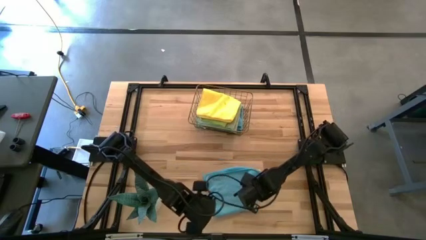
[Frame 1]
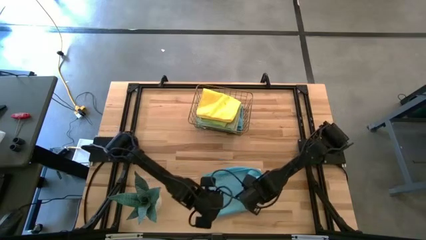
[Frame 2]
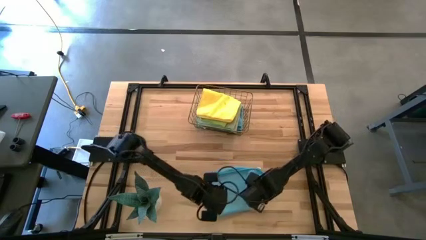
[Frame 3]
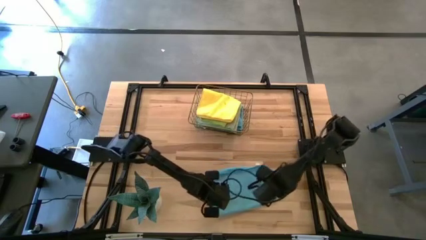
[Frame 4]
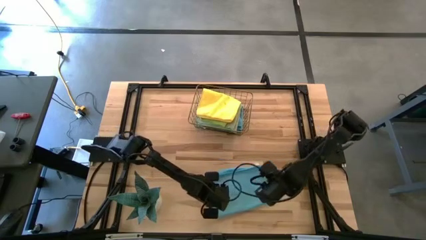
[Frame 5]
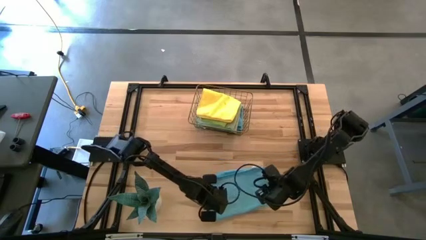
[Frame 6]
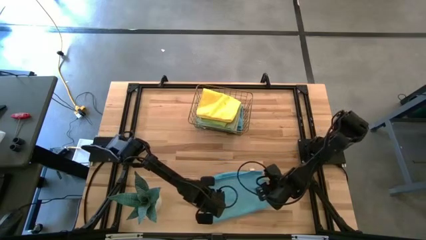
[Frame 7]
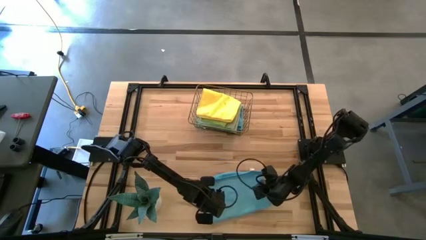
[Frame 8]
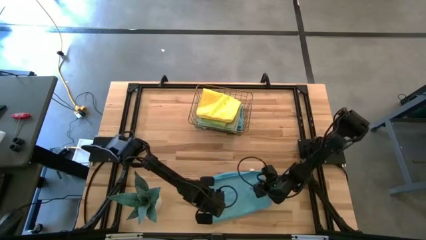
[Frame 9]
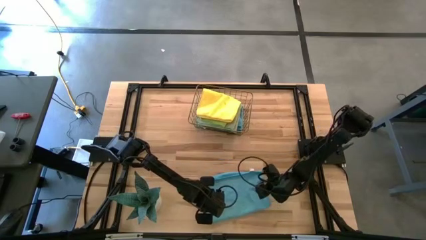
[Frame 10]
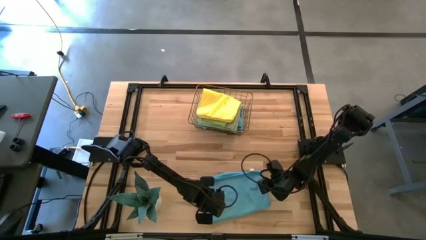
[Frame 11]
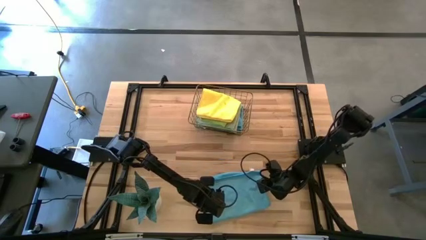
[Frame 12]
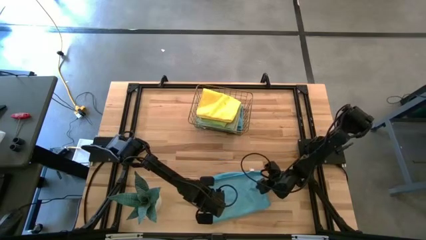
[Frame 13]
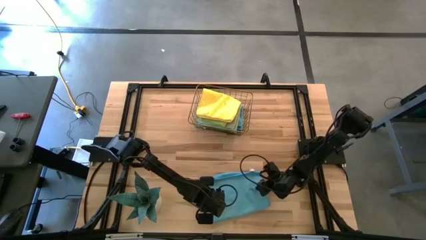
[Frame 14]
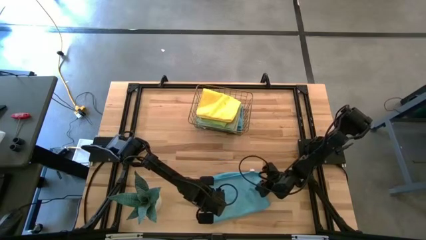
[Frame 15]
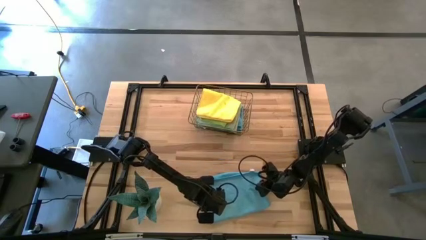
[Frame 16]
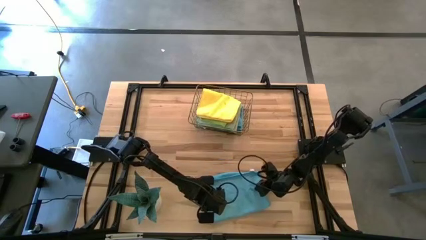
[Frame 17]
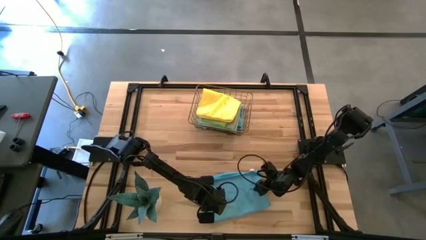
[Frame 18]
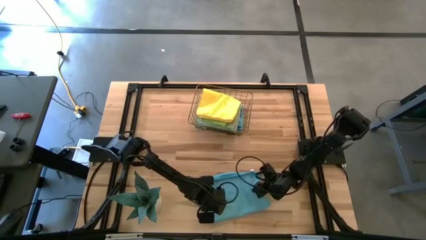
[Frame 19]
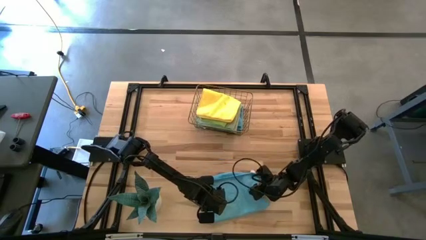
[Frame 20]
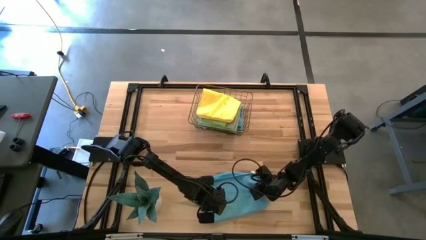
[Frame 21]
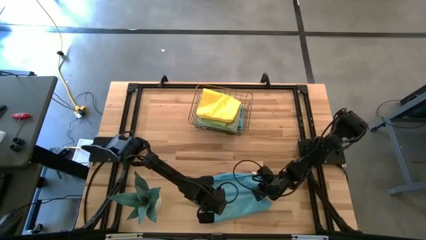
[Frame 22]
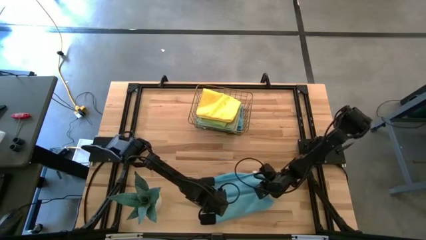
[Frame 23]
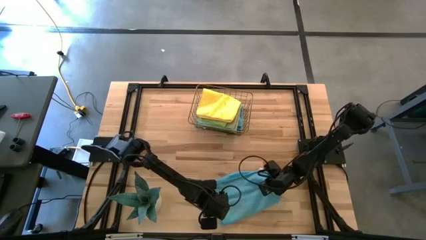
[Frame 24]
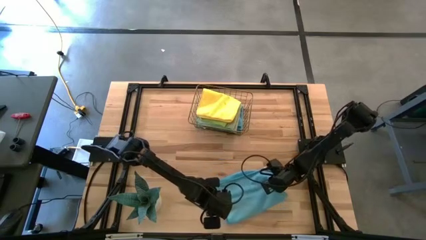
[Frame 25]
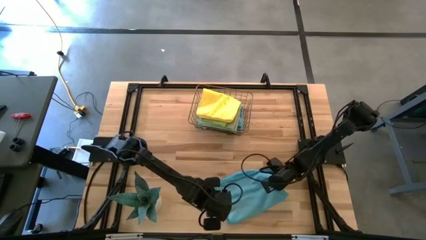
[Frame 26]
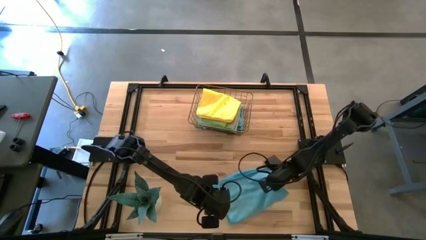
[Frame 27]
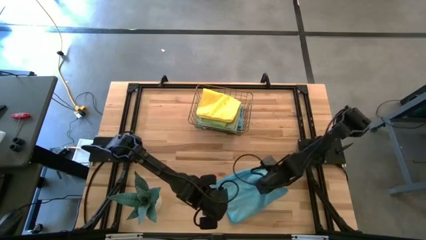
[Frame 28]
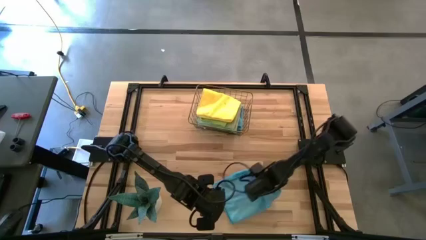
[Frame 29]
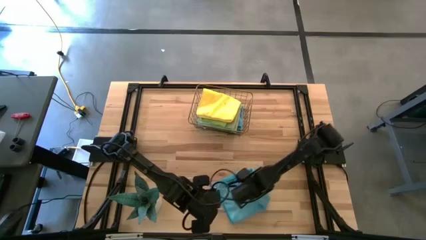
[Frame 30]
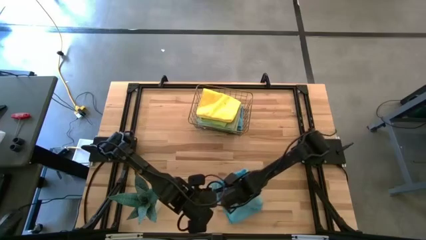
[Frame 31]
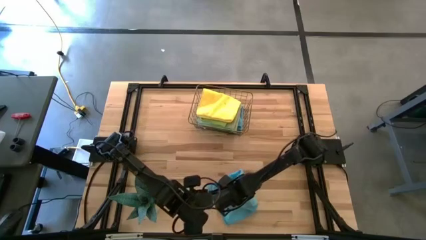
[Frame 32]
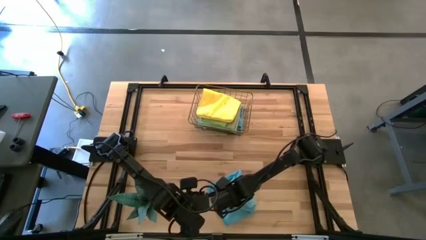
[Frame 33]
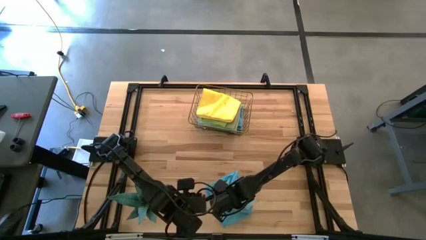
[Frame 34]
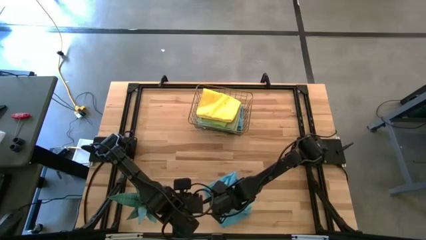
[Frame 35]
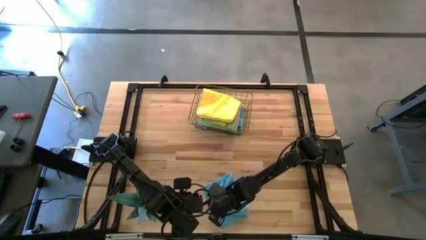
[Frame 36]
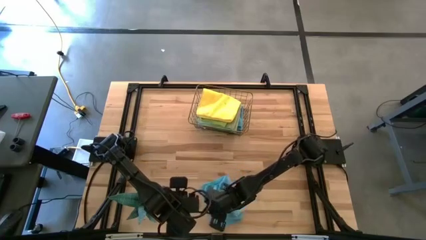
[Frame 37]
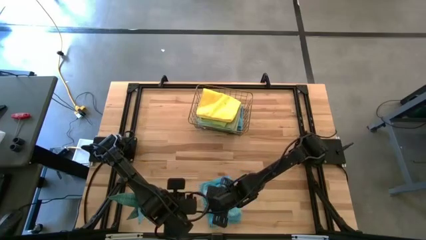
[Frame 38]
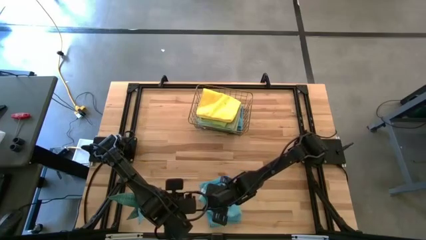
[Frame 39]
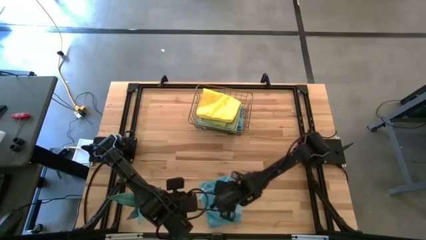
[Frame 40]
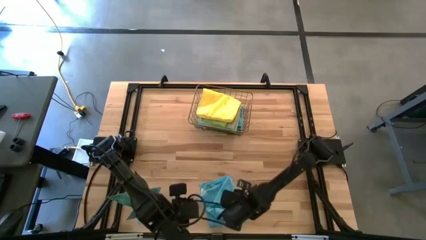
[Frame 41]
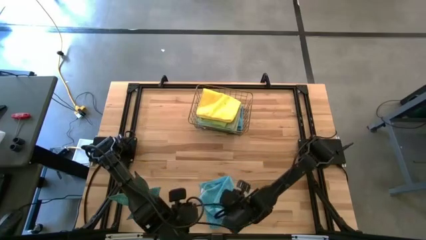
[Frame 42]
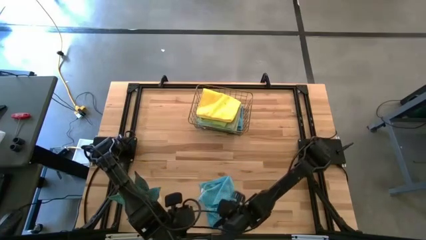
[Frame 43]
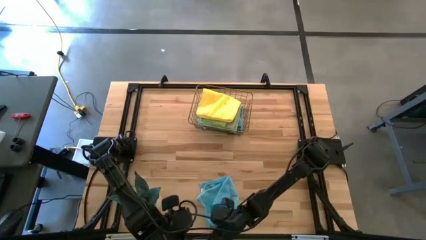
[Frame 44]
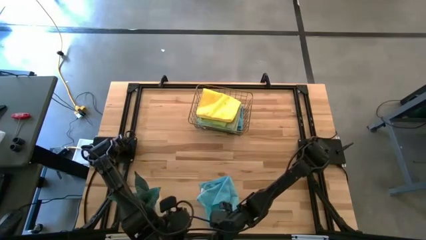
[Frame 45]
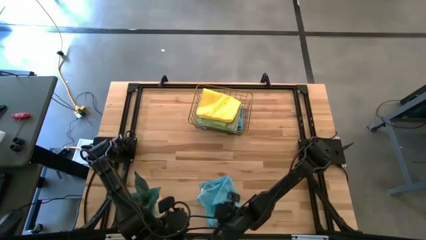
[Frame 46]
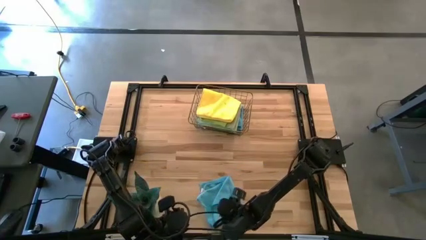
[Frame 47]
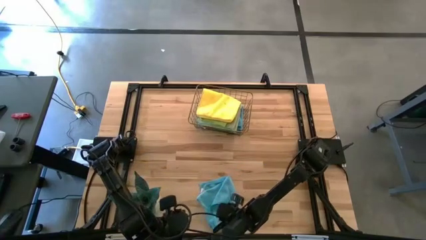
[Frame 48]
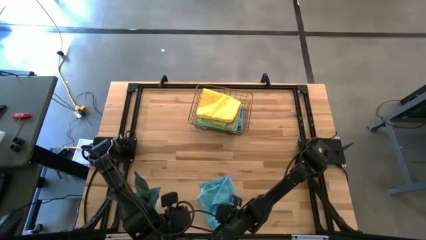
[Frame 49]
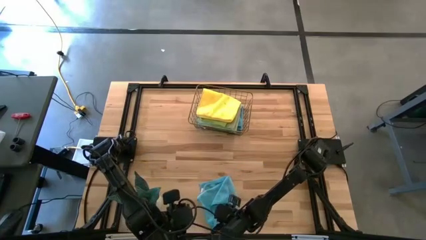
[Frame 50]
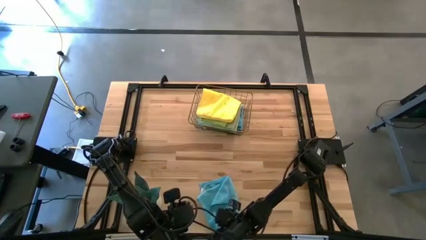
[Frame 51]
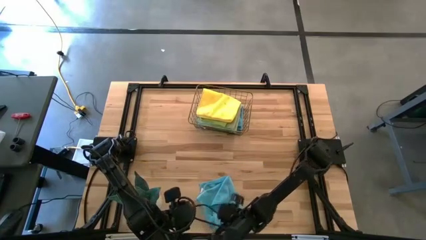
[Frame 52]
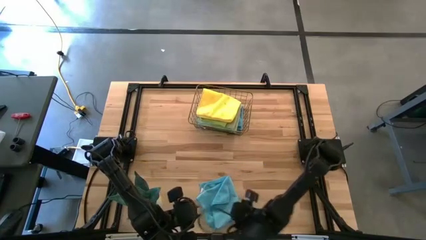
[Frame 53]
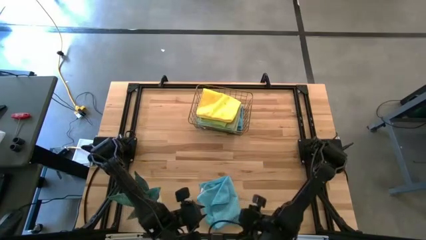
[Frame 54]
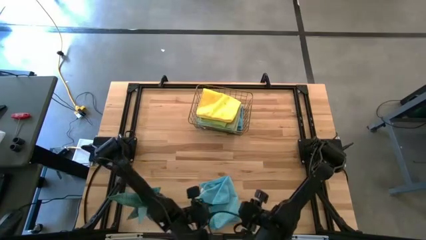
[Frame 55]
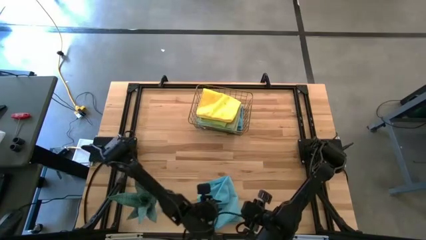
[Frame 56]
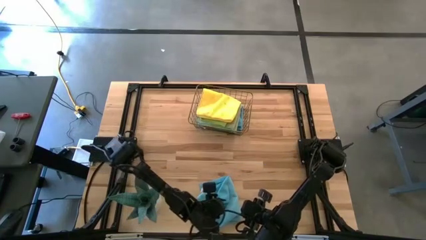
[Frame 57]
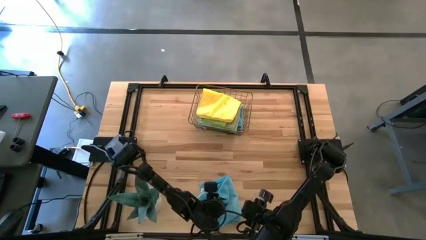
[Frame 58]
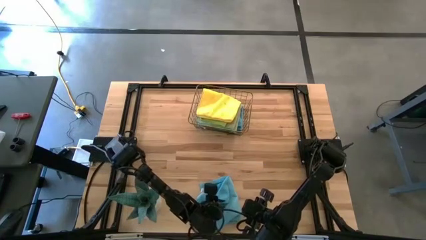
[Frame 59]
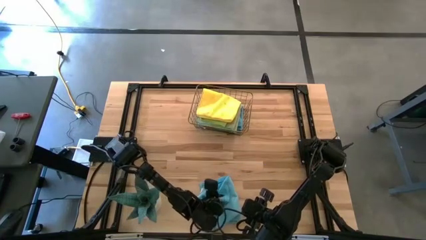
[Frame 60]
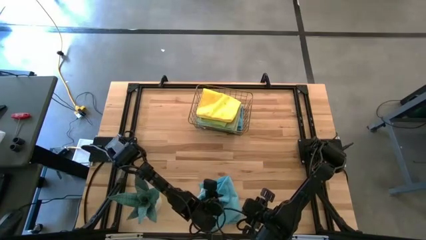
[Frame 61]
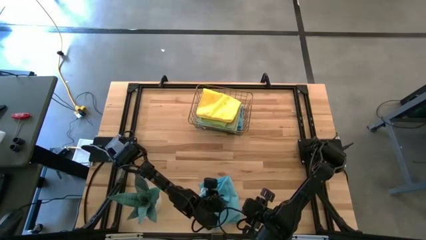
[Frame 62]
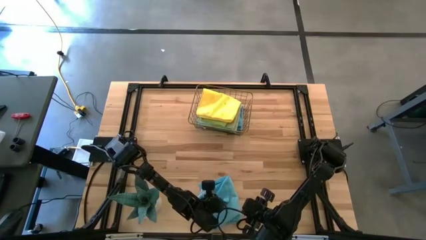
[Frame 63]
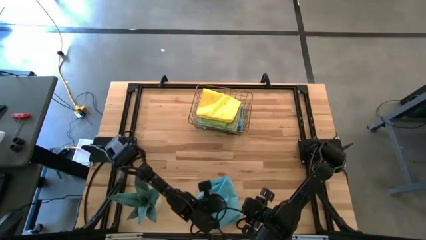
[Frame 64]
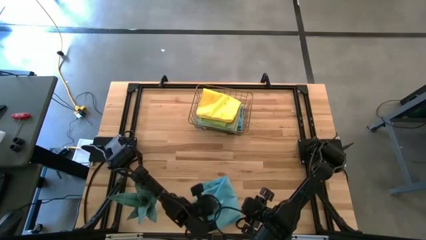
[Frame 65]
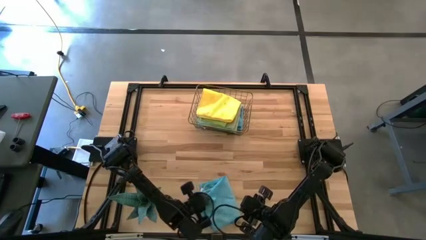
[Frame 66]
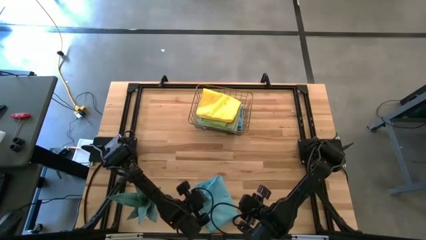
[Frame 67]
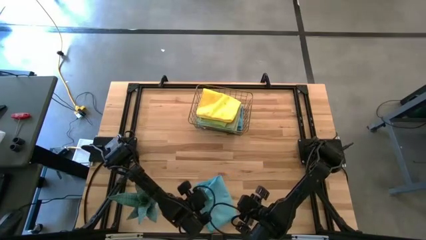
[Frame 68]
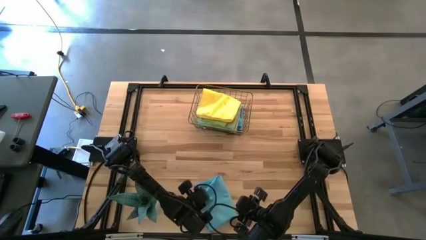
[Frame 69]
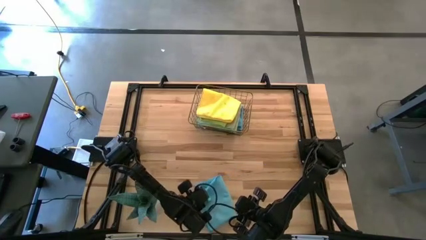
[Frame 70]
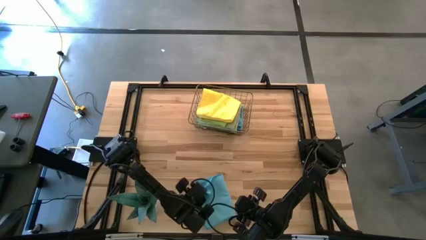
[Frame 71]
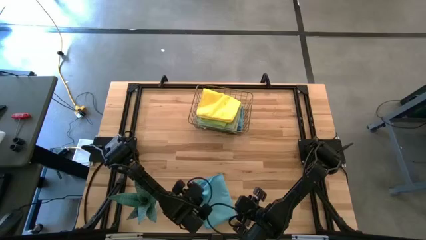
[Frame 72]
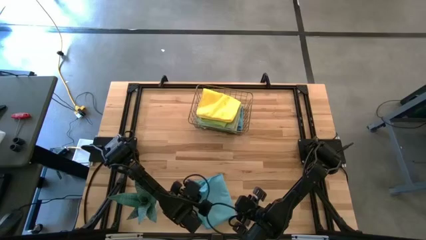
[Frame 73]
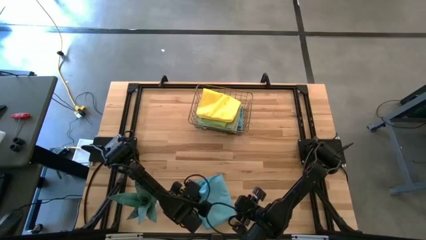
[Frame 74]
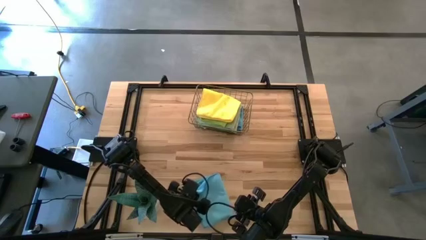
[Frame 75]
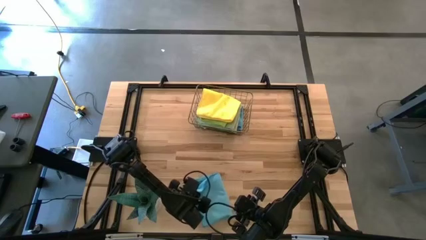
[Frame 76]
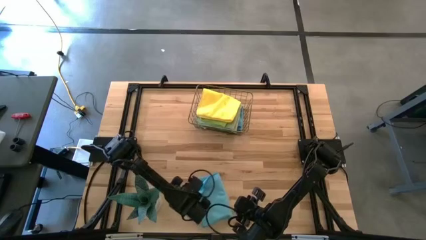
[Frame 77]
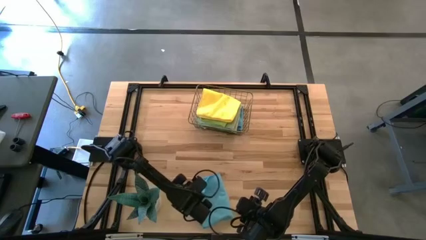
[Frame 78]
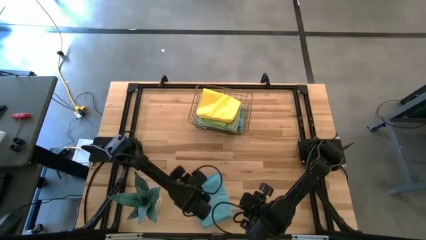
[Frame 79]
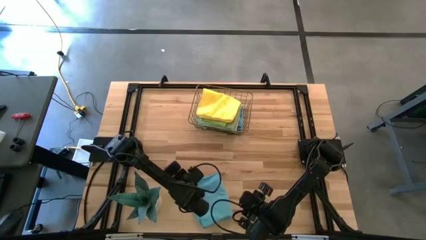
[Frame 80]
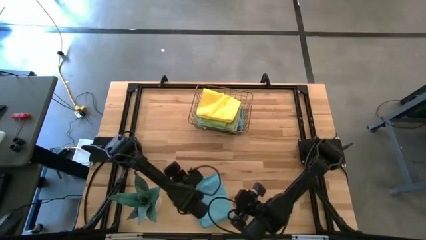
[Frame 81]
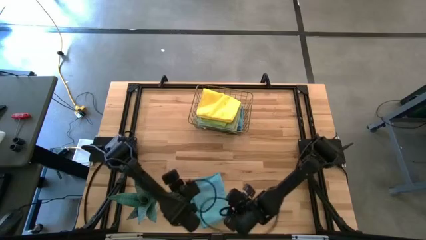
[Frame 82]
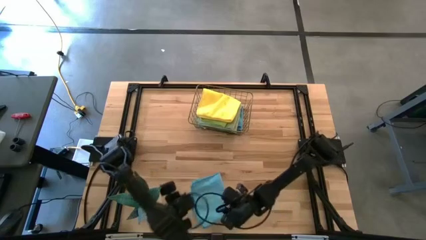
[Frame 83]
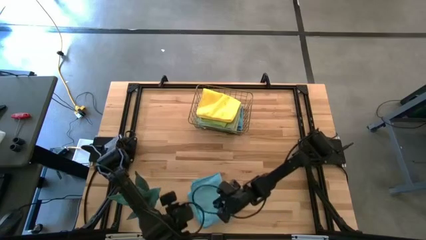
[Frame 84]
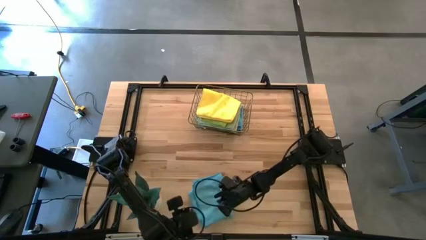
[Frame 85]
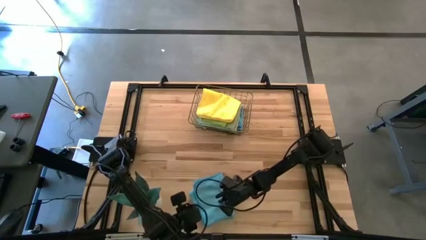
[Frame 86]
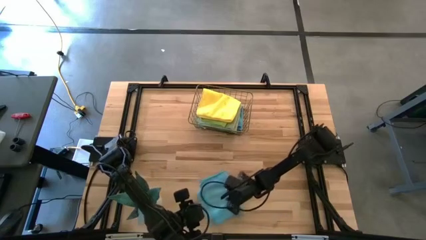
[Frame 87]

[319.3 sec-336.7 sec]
Task: Fold microfiber towels
Fold the blue towel
